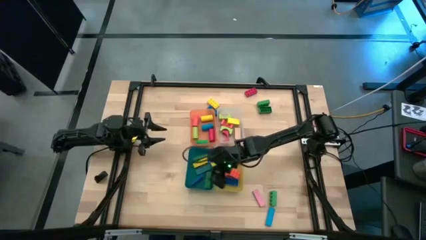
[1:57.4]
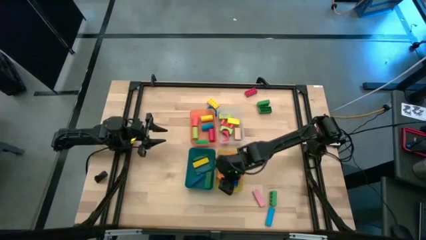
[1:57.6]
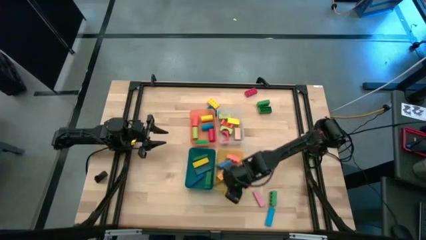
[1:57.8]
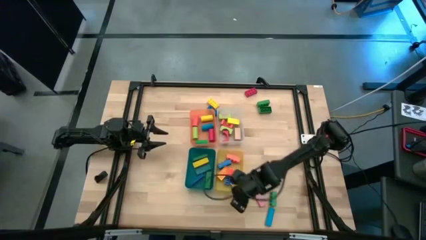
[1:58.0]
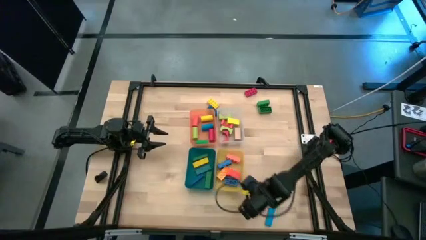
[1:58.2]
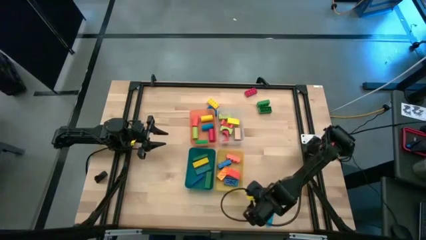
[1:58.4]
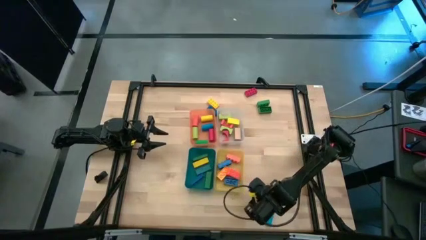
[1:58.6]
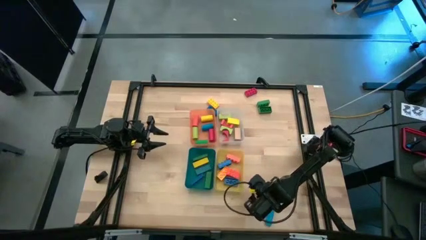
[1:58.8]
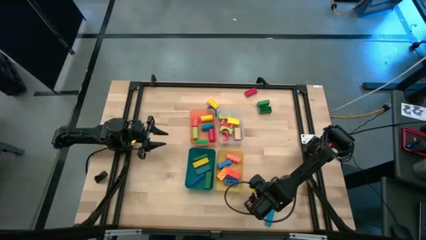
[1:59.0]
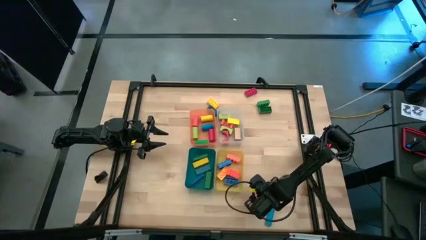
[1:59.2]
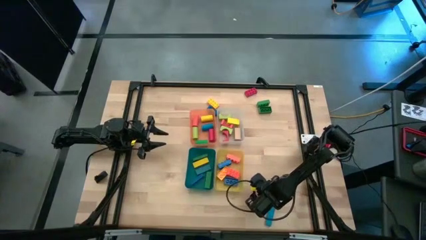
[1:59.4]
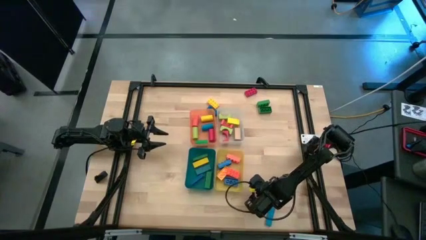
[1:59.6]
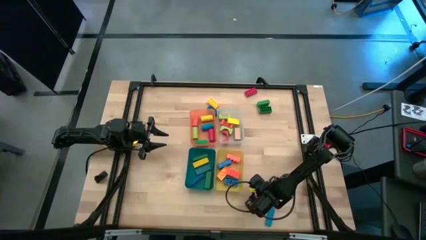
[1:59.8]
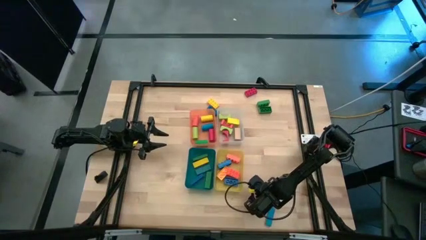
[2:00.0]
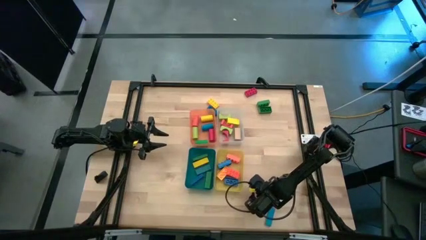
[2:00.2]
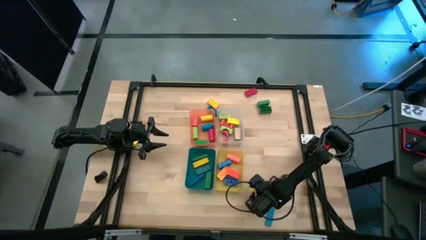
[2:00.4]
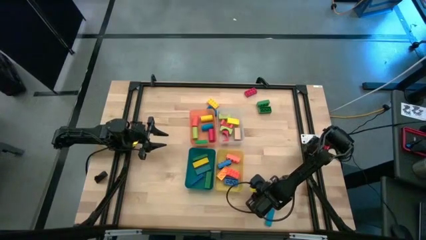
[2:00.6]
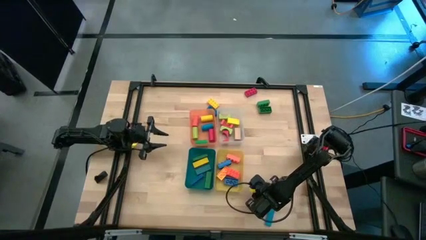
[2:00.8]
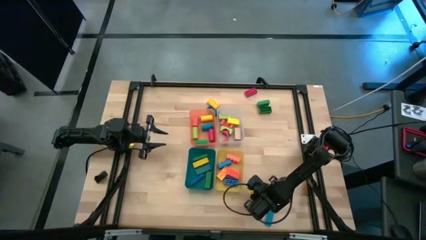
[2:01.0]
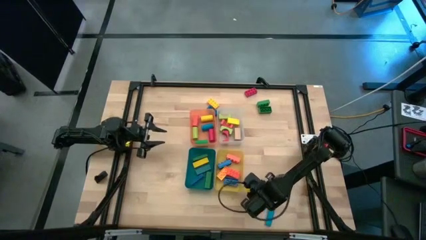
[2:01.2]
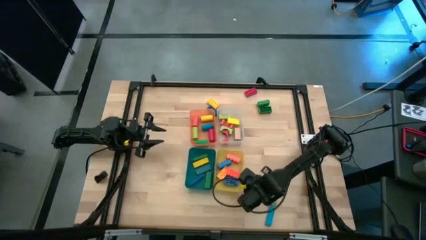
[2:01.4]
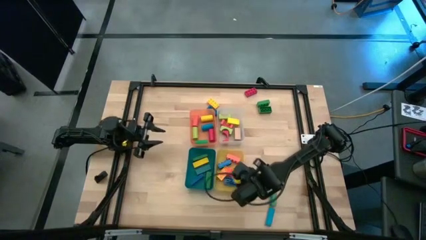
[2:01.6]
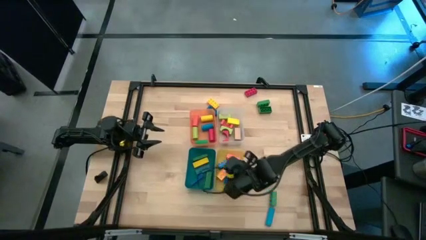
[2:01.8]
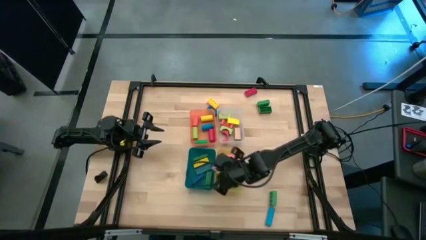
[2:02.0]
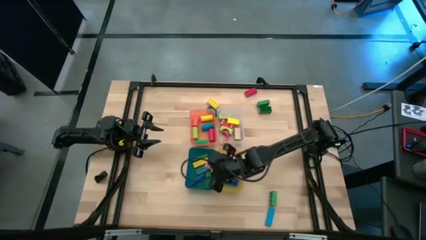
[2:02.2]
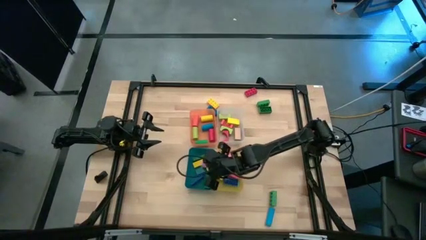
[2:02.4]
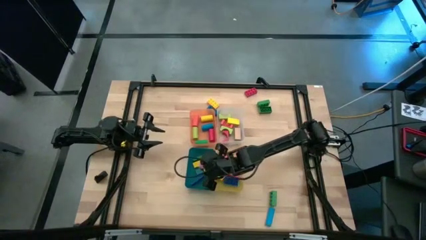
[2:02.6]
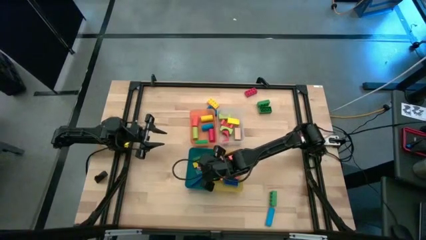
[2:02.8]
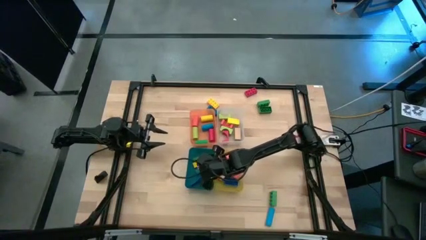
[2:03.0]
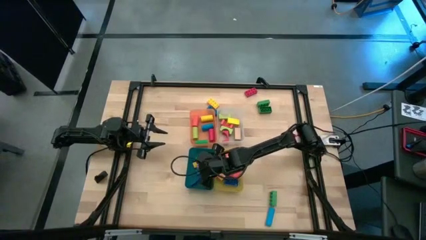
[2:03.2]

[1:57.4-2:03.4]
Task: Sort blocks by size
Put the pink rectangular block into the blue bin

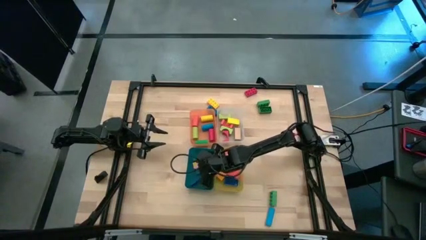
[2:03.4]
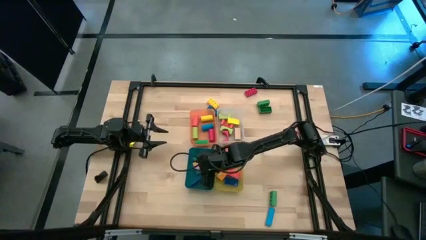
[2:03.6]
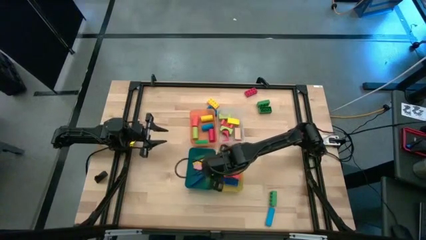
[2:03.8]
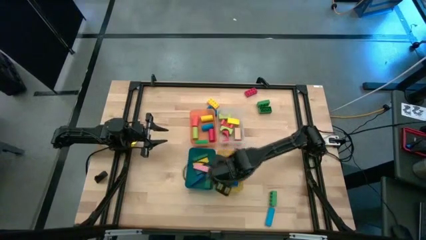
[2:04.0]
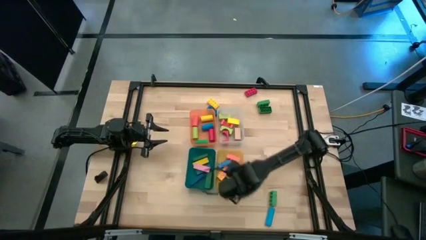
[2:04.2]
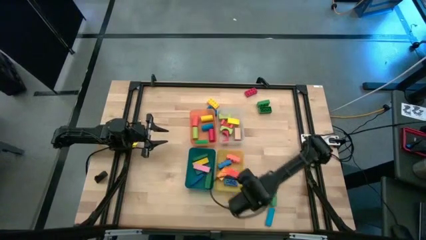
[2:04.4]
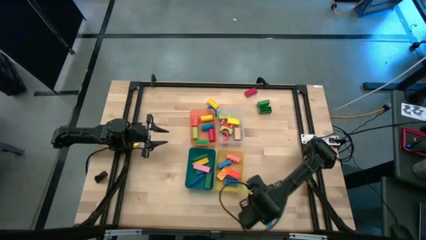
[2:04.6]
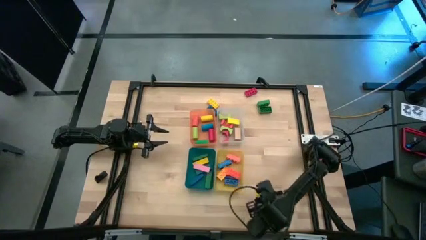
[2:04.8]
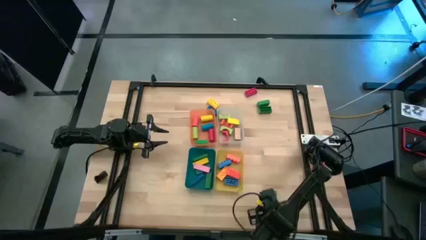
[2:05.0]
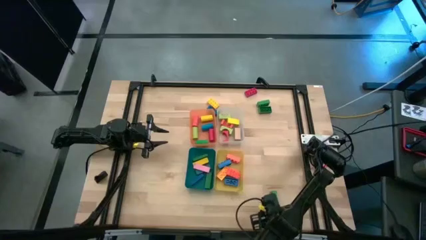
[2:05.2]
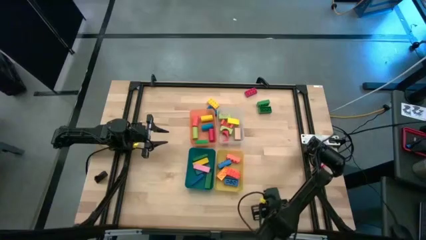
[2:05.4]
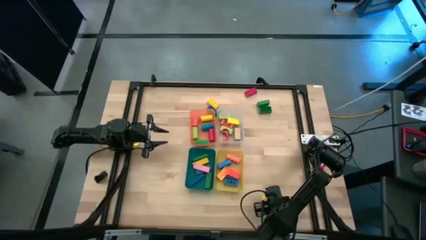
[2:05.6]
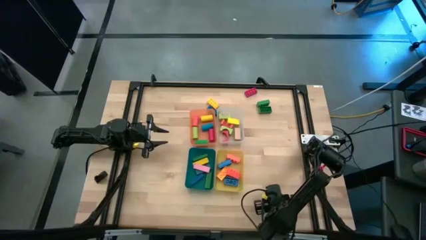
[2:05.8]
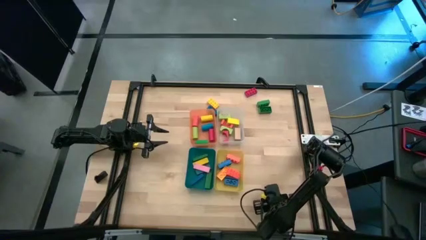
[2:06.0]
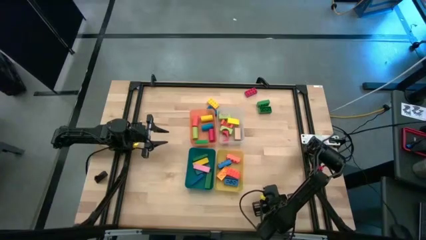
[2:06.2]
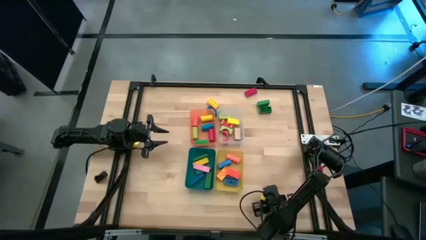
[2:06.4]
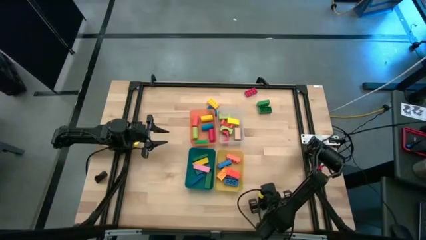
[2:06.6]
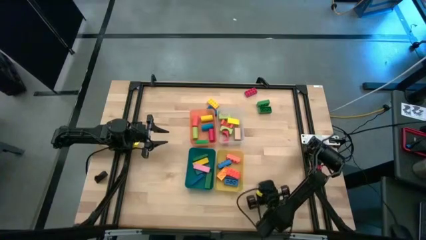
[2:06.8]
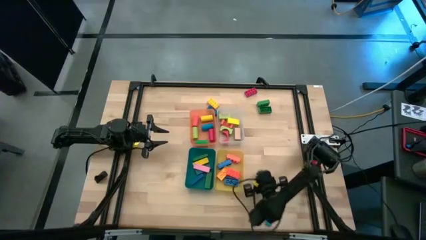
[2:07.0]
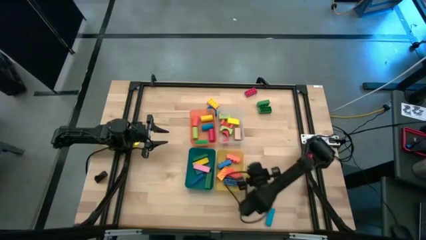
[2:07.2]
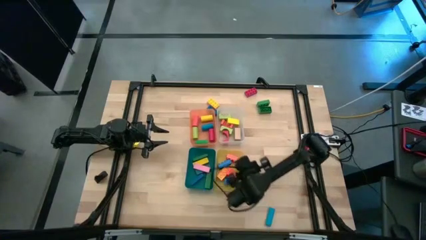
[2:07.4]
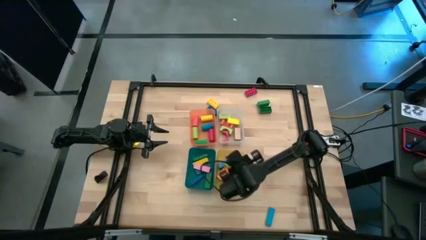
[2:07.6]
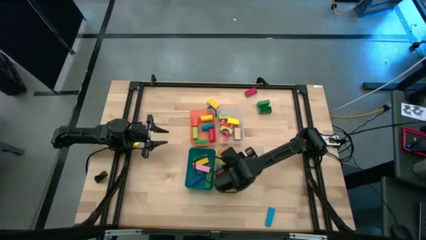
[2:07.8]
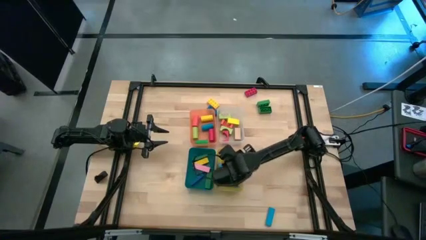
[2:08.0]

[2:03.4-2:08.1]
Put the bottom green game piece into the yellow bin

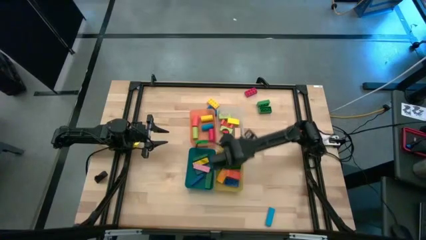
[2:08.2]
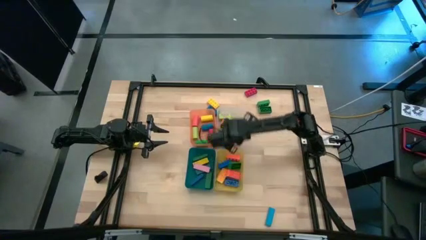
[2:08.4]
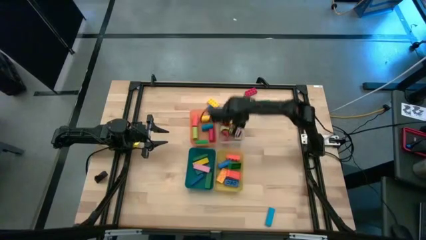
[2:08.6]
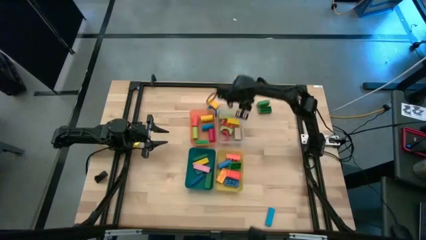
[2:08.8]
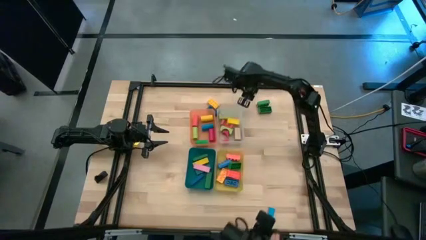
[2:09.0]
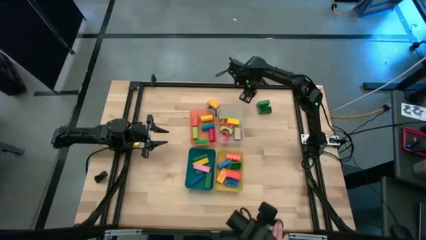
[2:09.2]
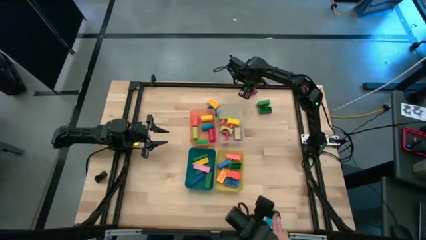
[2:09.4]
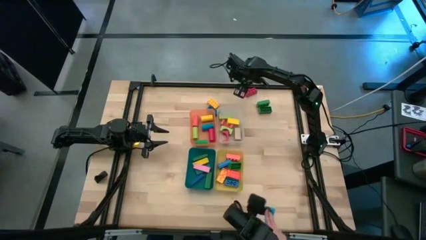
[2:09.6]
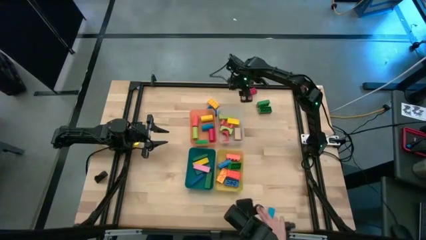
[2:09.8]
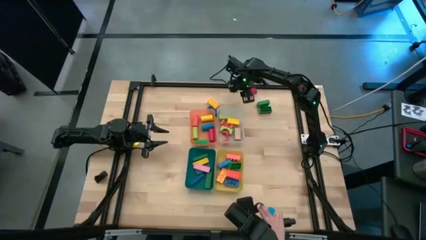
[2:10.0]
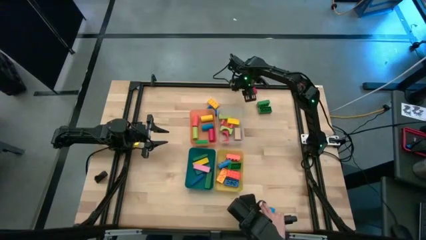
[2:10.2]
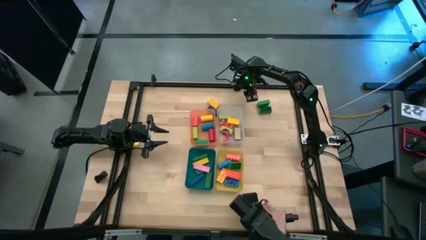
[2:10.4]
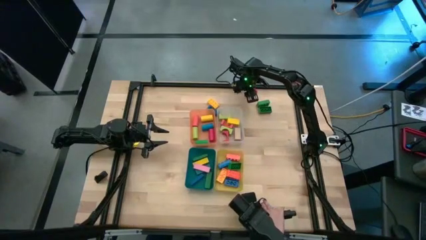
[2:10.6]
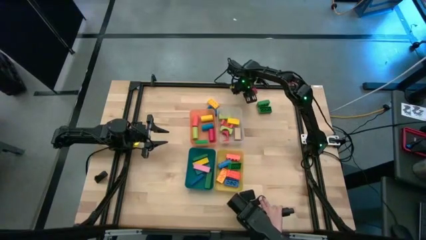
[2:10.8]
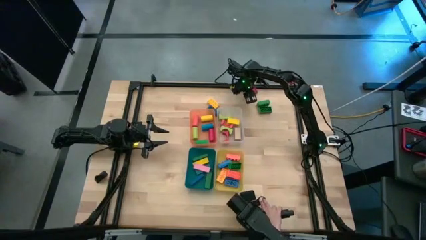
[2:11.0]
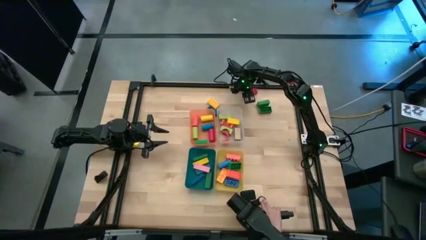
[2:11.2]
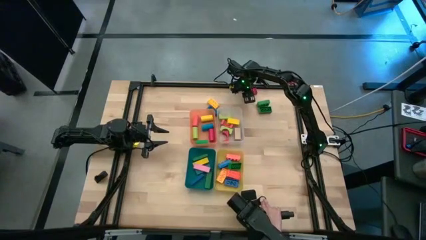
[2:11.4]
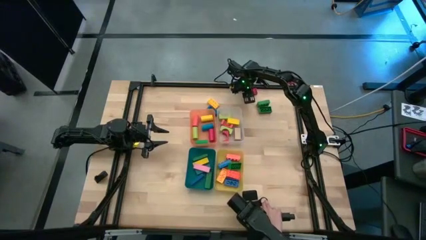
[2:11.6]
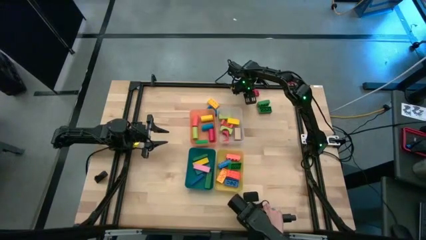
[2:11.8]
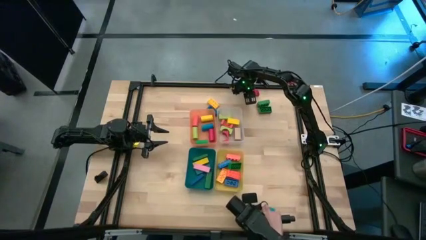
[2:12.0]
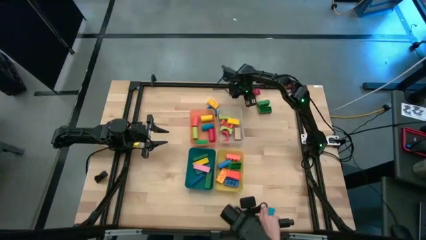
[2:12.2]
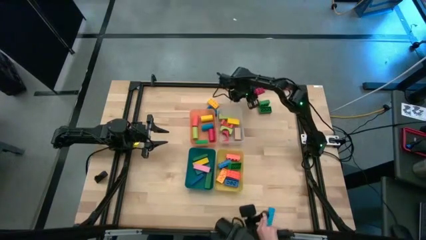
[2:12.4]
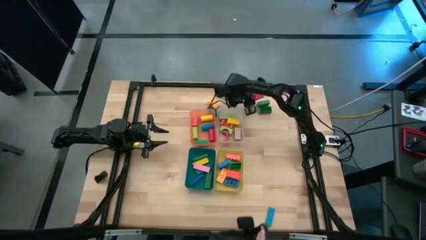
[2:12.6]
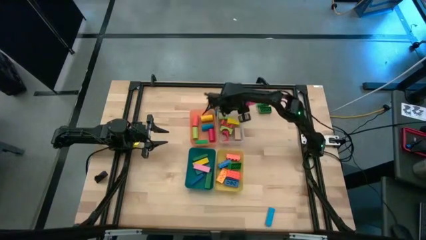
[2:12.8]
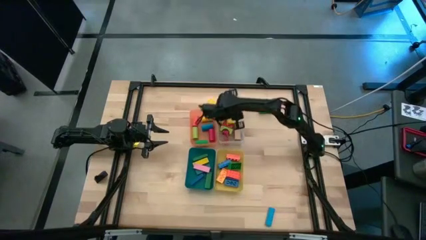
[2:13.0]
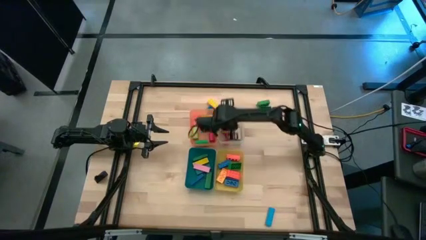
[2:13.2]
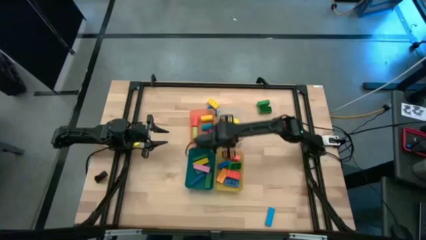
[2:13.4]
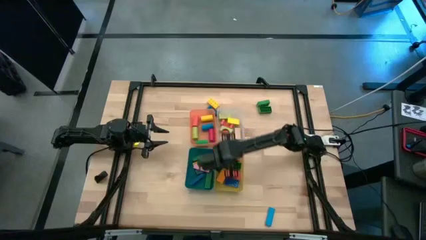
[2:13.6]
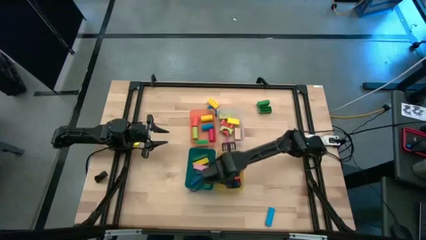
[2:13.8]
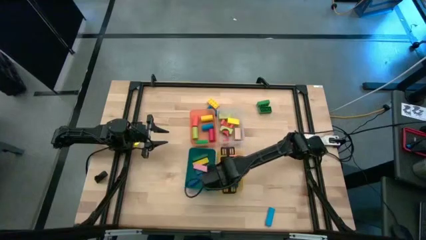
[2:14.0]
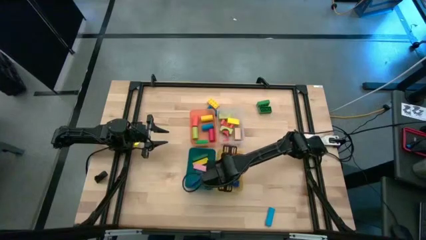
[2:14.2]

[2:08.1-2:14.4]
Put the red game piece into the yellow bin
